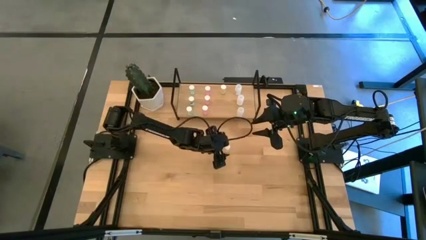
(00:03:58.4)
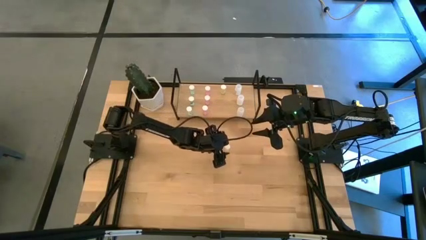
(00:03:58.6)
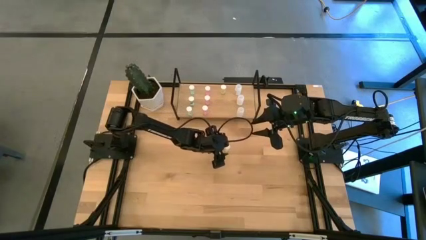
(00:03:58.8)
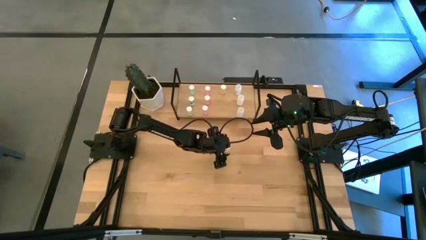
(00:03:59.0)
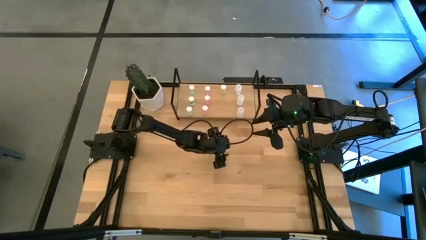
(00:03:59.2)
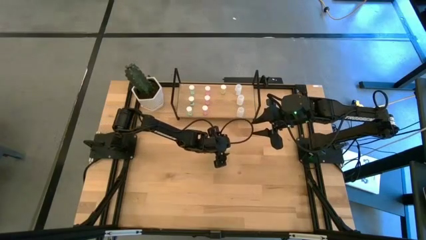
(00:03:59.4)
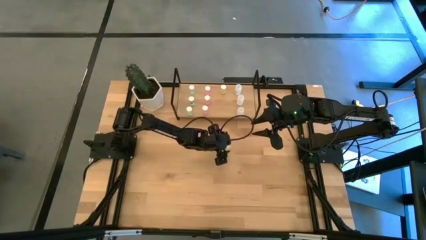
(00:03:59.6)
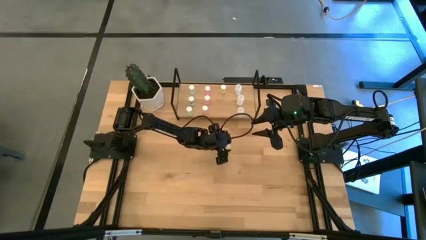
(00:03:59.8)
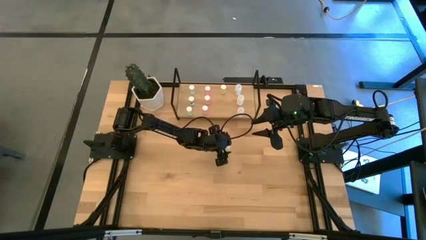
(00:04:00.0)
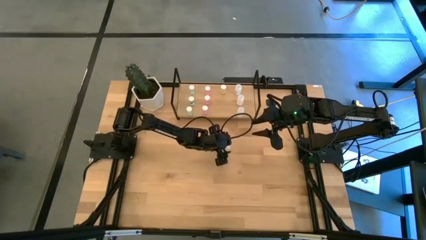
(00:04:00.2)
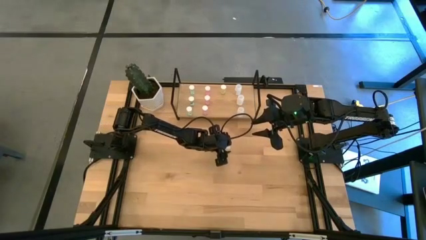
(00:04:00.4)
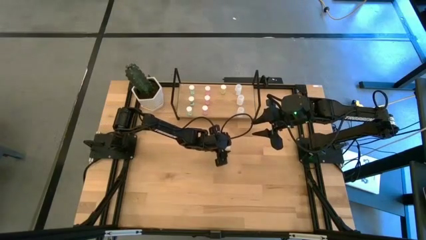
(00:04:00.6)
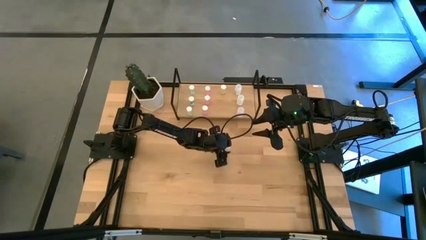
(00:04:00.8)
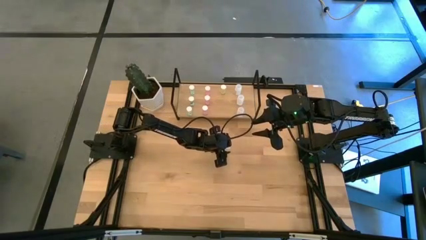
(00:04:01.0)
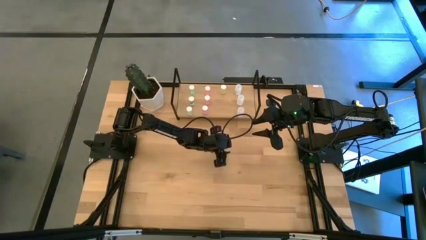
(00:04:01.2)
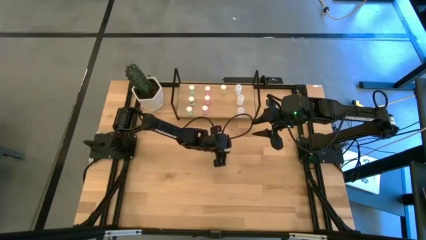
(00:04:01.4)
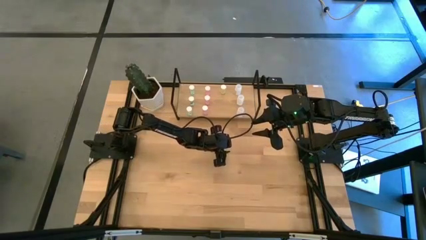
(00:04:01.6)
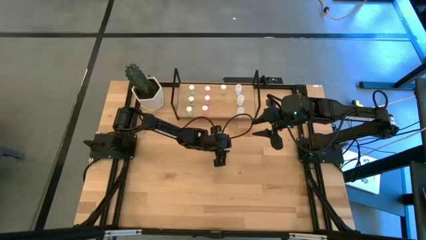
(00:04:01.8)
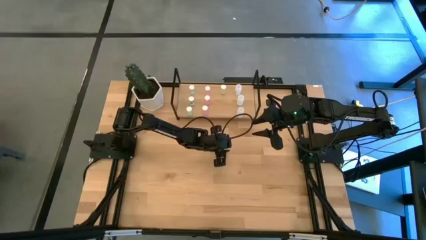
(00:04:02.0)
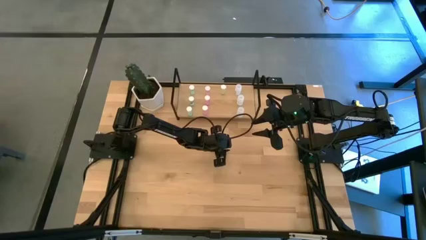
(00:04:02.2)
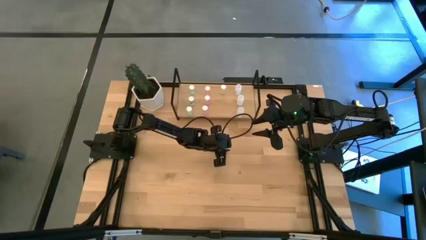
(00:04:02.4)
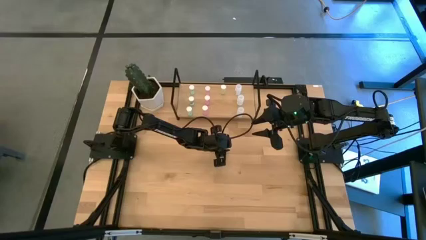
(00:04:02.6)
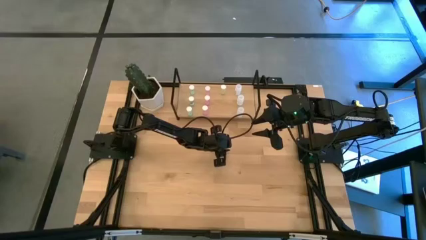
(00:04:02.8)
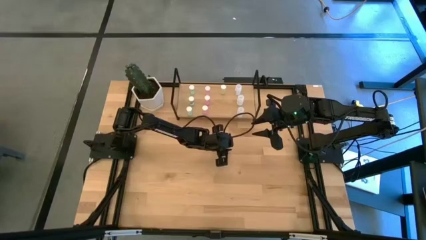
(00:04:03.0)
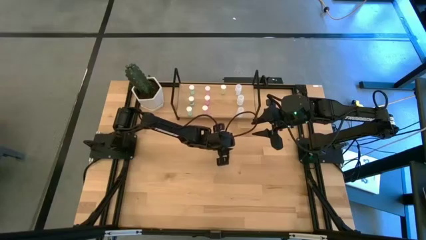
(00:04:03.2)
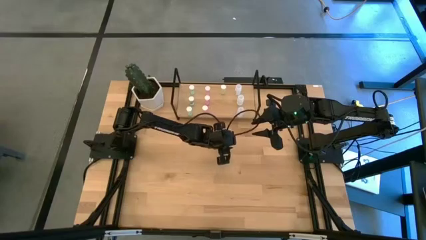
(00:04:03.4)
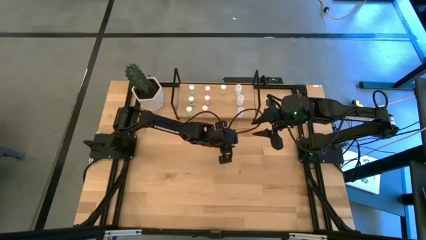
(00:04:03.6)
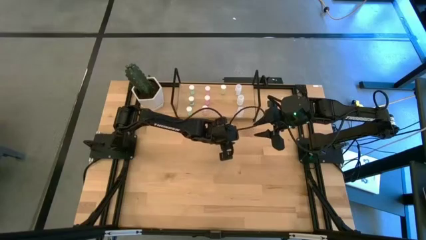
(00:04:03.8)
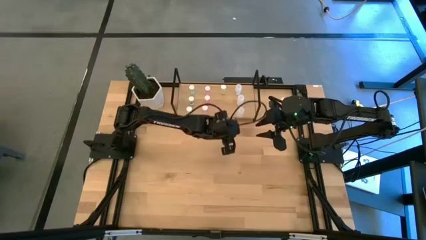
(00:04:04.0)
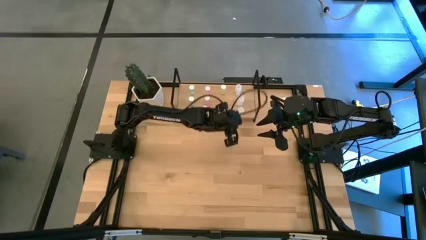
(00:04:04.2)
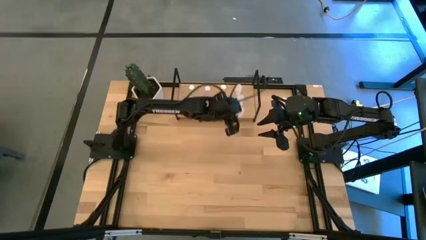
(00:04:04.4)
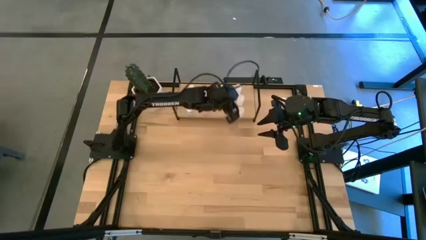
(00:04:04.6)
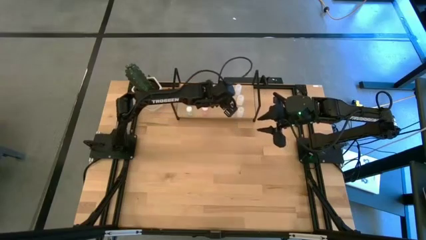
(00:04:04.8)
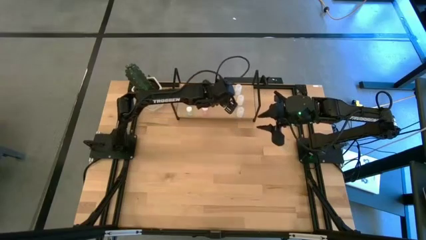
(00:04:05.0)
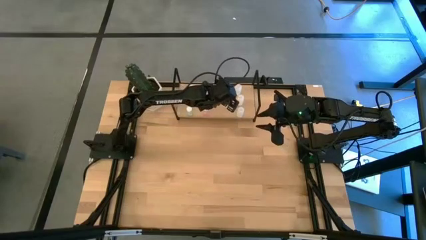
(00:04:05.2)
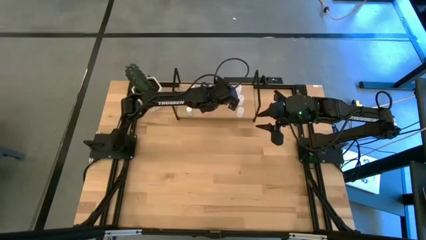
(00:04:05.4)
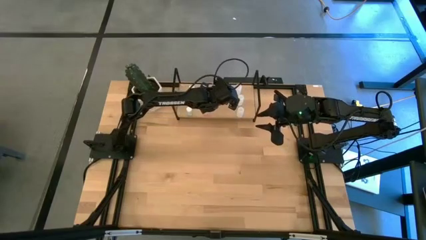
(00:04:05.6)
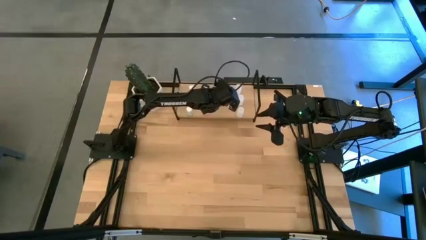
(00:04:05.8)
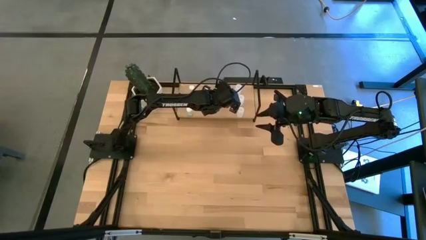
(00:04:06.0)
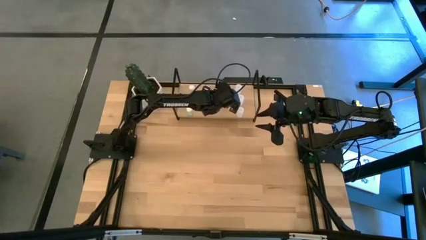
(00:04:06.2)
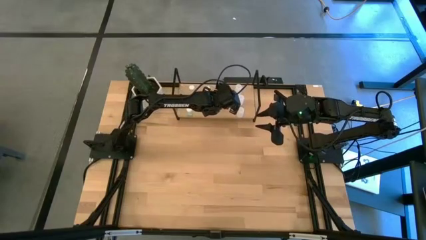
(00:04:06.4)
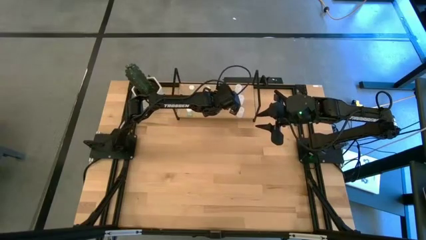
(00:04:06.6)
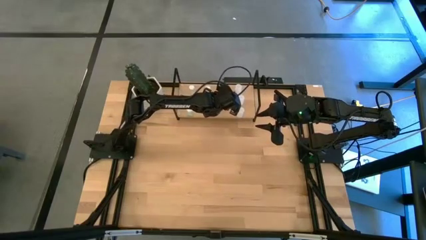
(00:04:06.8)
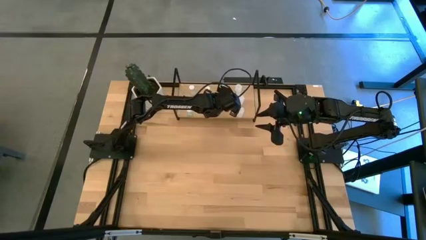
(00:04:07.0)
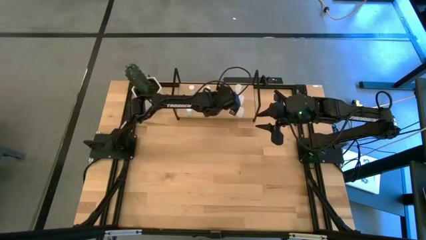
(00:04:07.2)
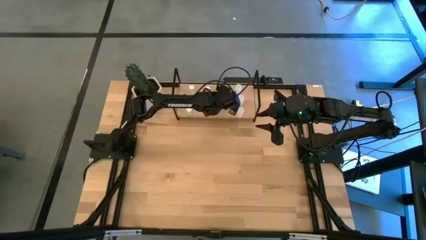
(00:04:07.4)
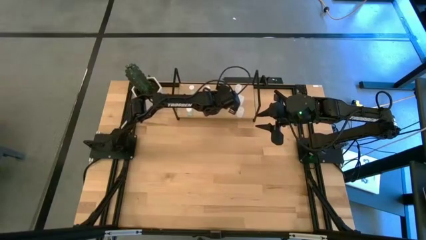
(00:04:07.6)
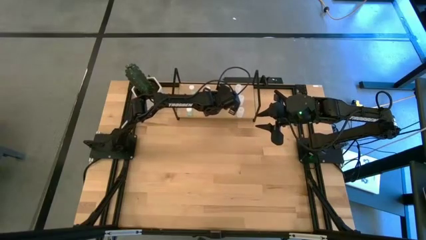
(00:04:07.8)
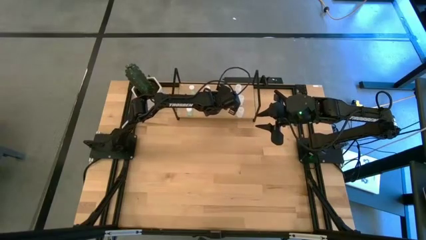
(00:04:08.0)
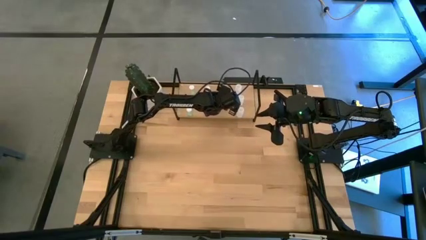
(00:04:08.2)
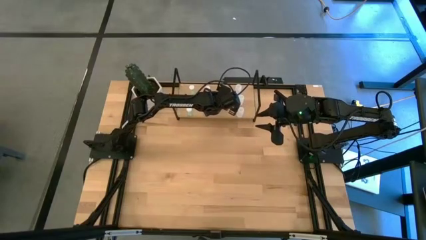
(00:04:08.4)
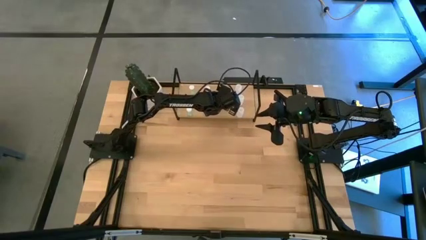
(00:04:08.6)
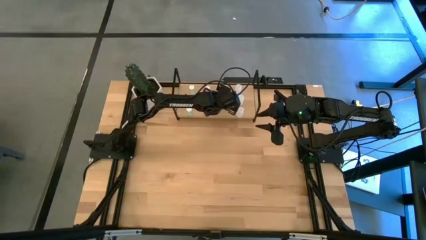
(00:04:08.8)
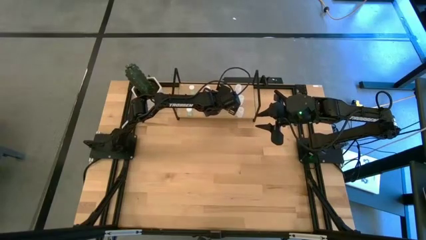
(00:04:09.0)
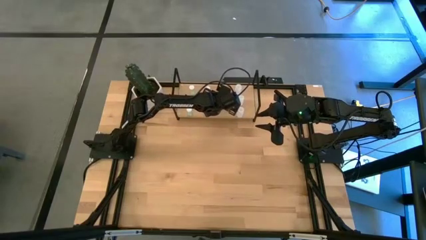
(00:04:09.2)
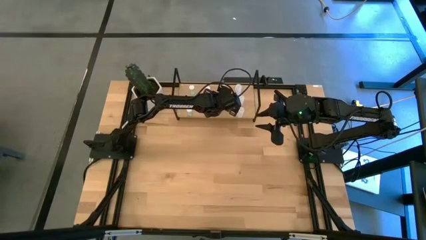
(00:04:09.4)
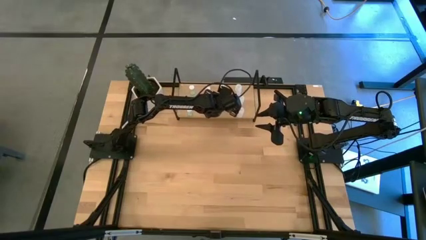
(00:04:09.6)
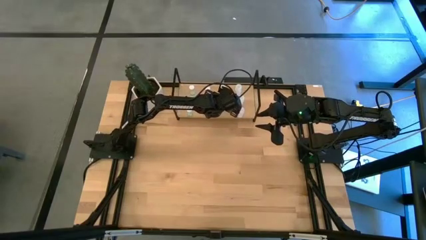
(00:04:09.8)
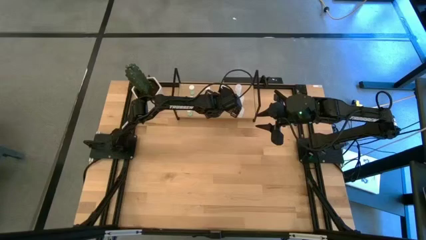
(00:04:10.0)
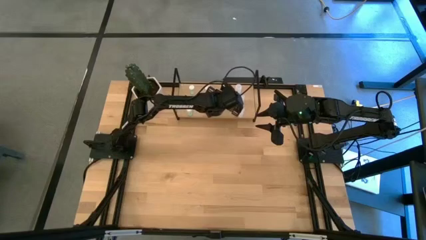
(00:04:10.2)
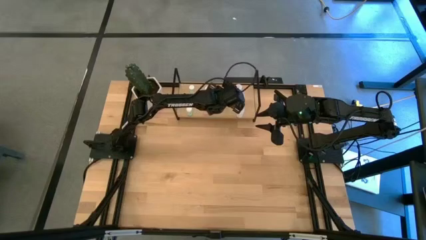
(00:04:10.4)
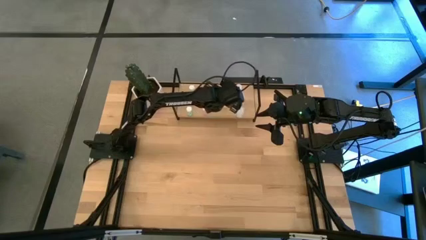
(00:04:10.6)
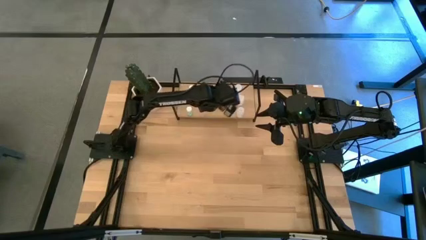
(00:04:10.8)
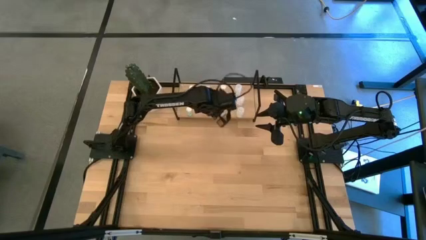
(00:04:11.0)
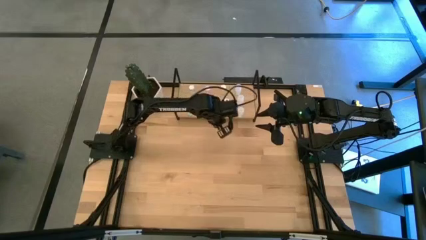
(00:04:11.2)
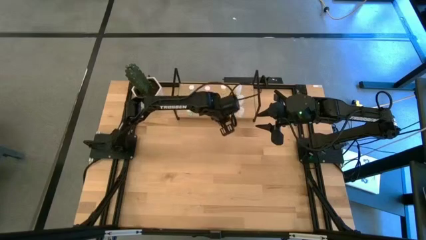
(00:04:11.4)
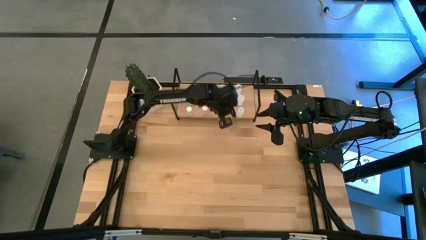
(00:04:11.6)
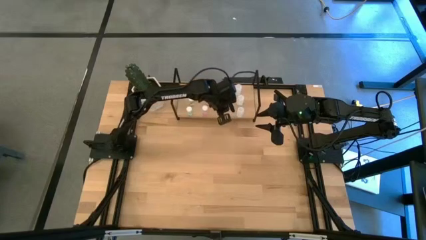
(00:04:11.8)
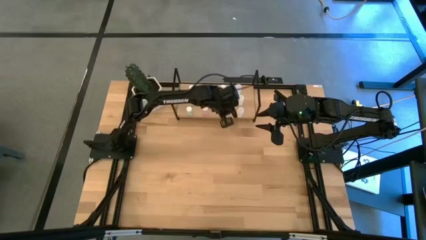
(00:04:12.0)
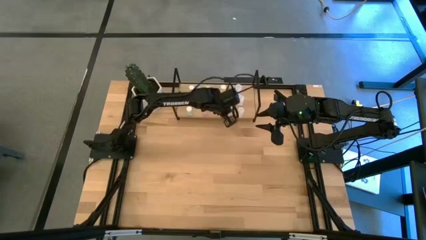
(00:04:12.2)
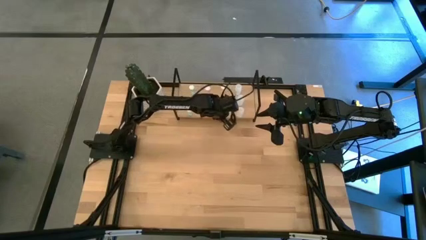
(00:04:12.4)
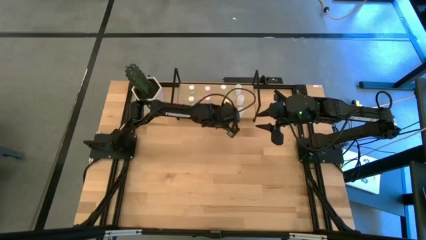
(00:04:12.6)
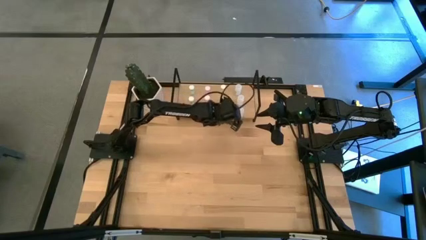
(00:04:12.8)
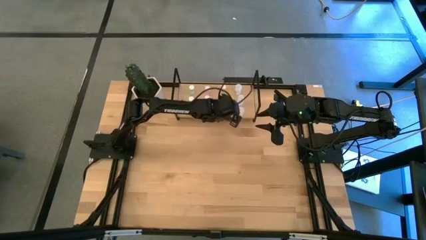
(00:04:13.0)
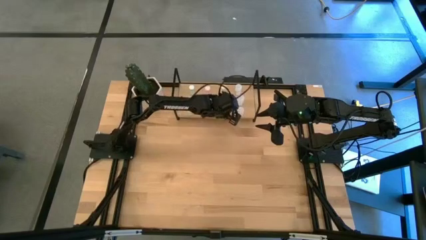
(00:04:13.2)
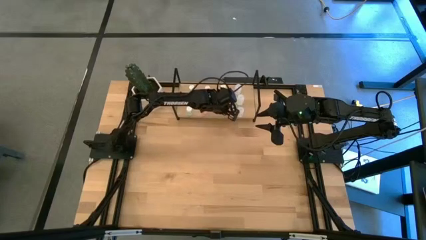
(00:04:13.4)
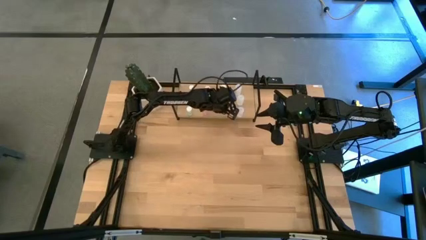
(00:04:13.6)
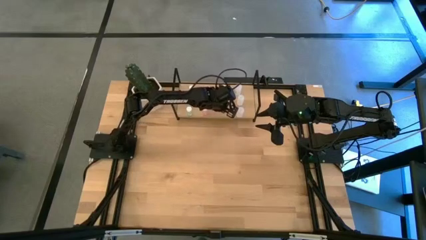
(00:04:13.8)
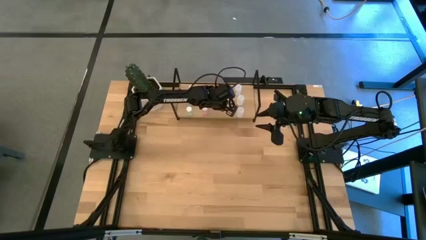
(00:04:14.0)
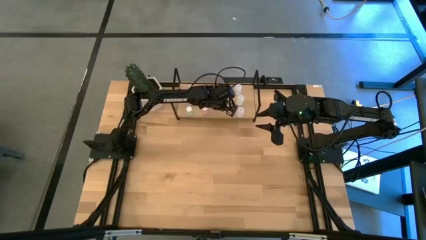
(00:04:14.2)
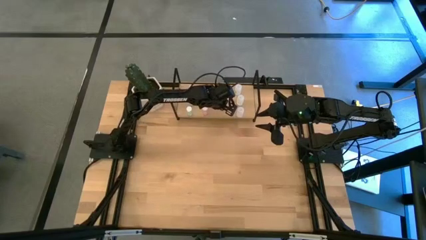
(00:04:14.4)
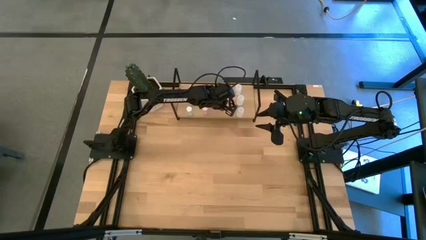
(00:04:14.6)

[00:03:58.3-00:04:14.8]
Task: Pick and place medicine bottles onto shelf by color
Put the bottom yellow pill bottle on the shelf aligned with the other yellow pill bottle
